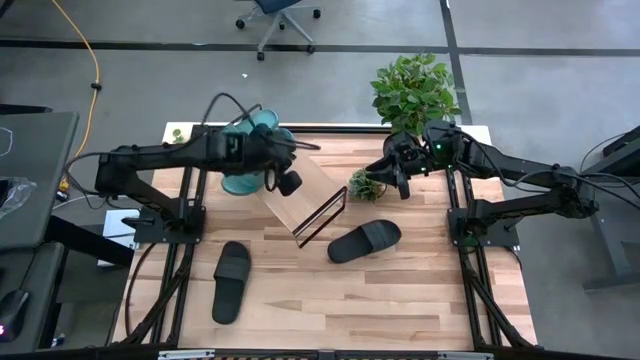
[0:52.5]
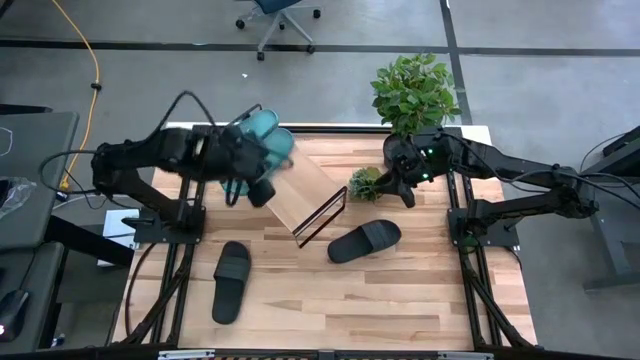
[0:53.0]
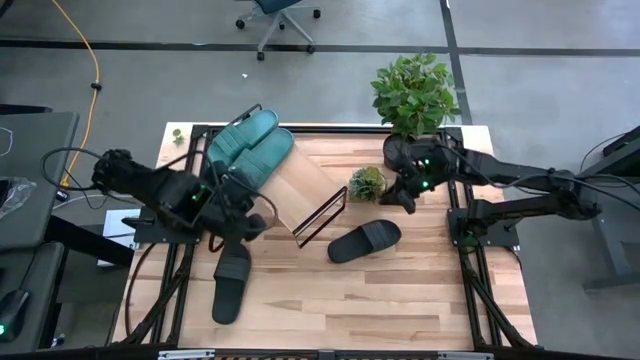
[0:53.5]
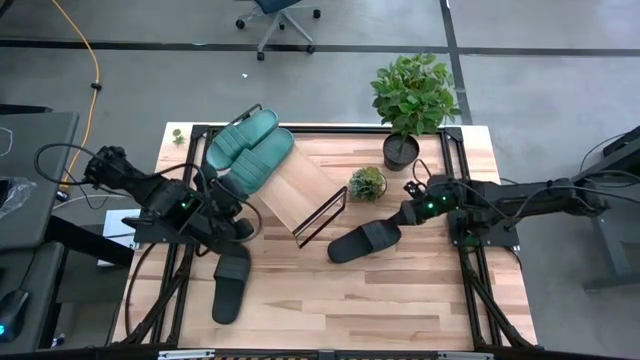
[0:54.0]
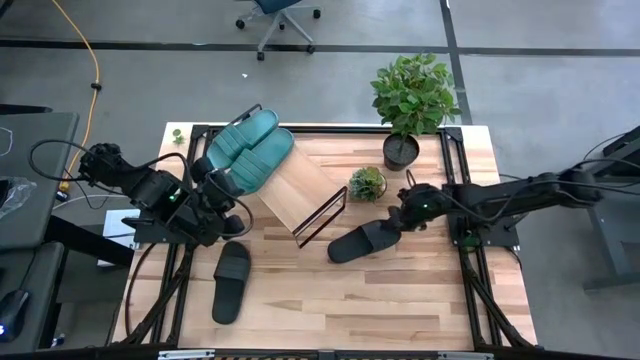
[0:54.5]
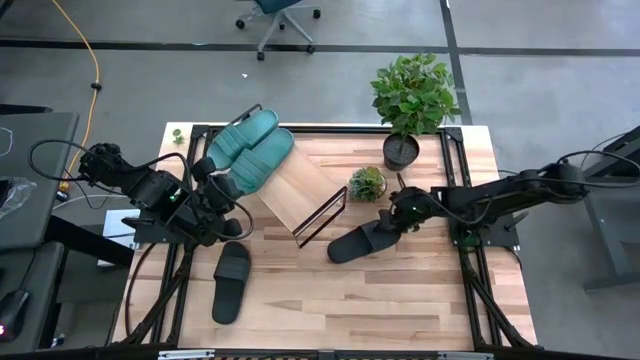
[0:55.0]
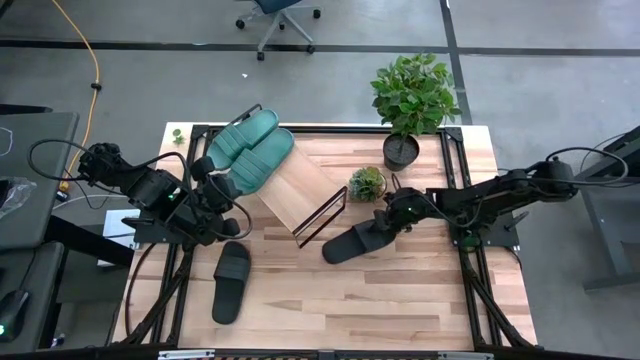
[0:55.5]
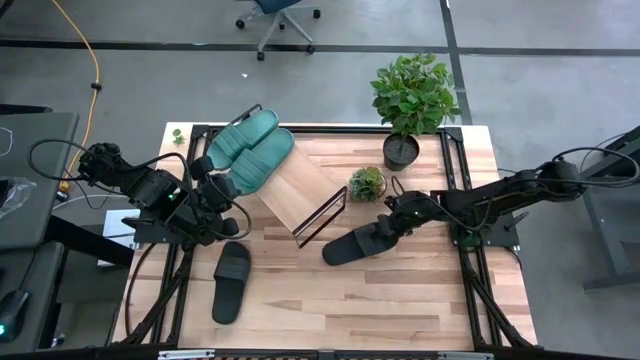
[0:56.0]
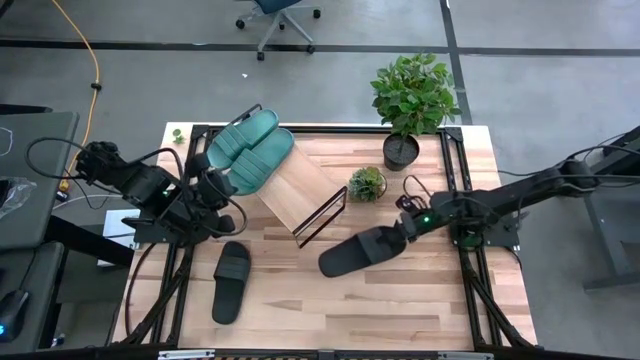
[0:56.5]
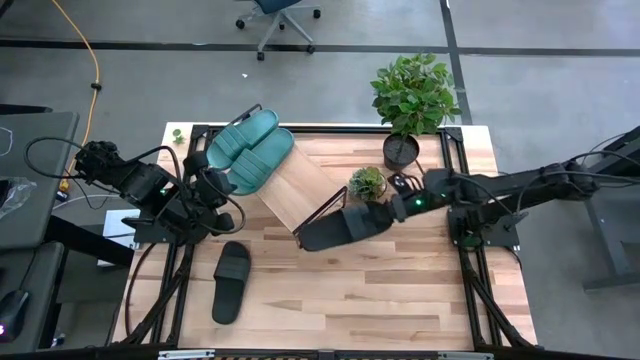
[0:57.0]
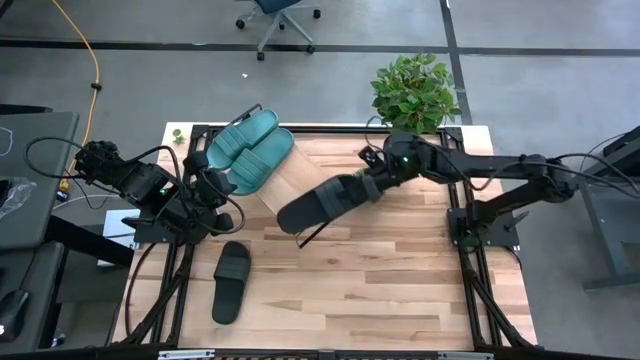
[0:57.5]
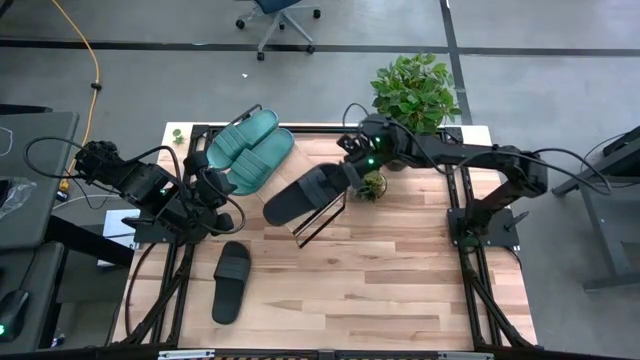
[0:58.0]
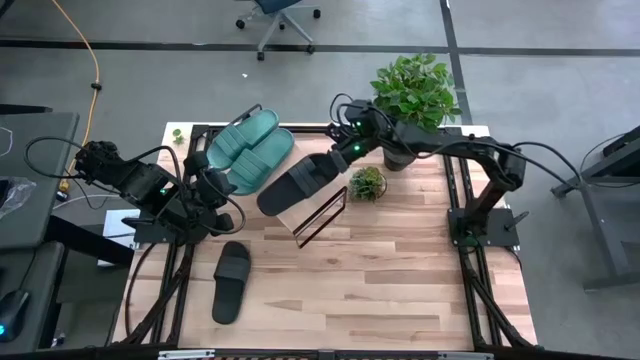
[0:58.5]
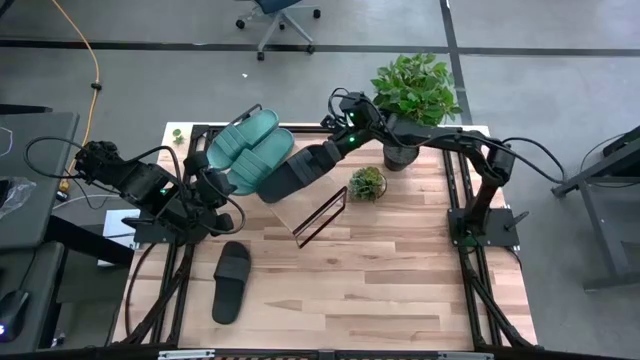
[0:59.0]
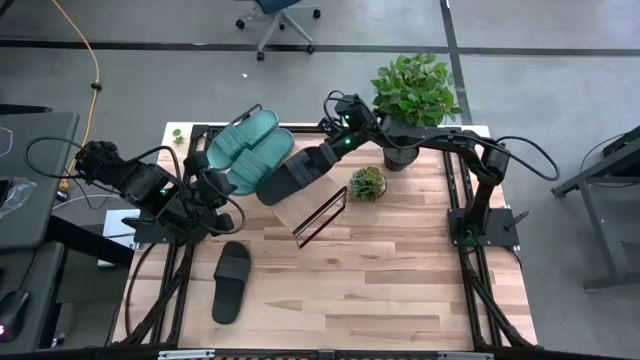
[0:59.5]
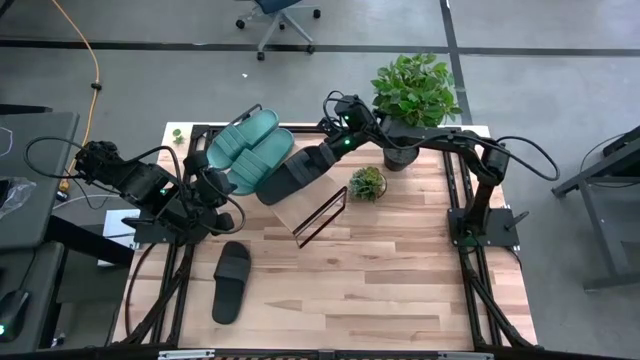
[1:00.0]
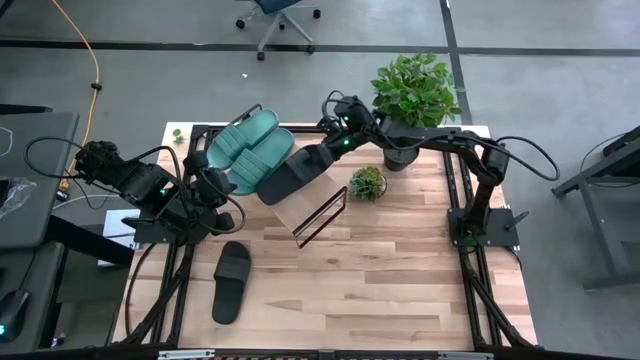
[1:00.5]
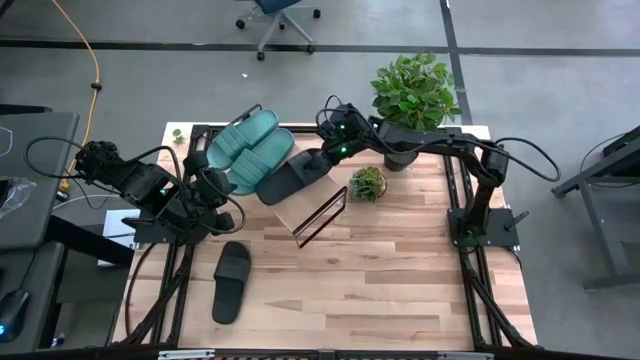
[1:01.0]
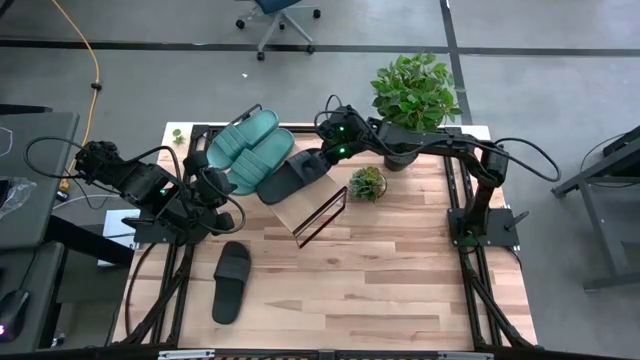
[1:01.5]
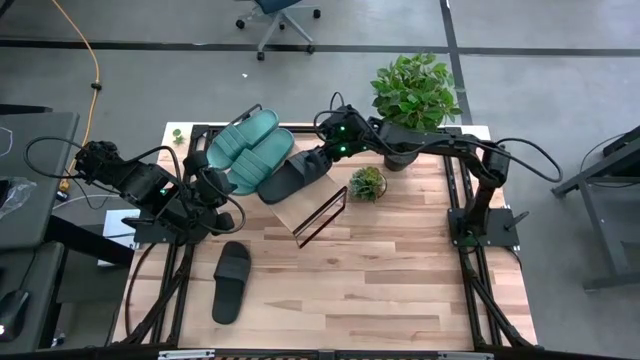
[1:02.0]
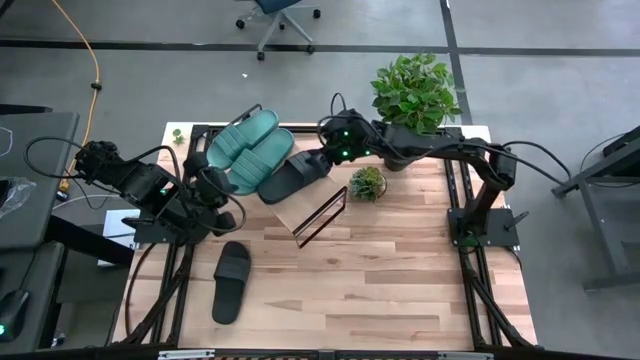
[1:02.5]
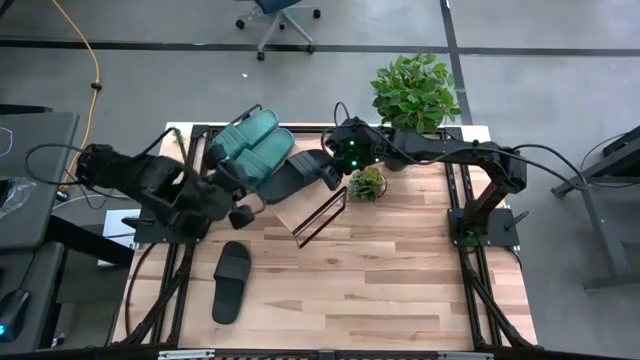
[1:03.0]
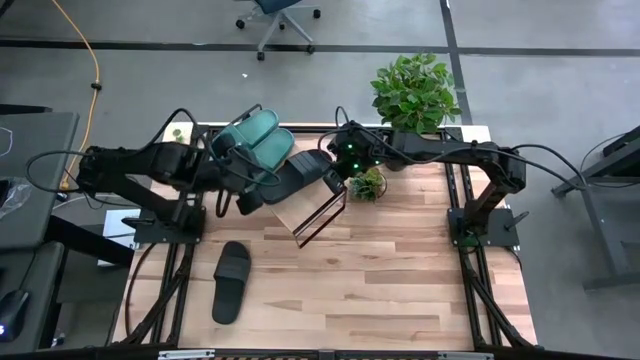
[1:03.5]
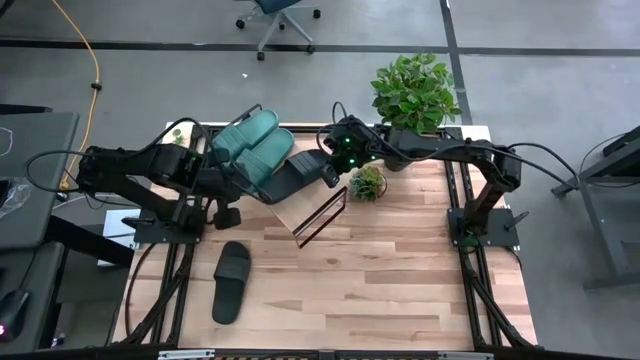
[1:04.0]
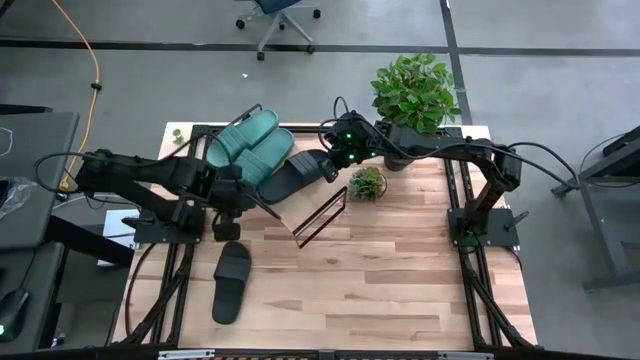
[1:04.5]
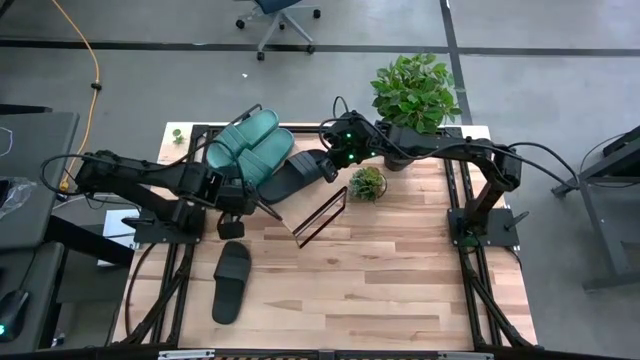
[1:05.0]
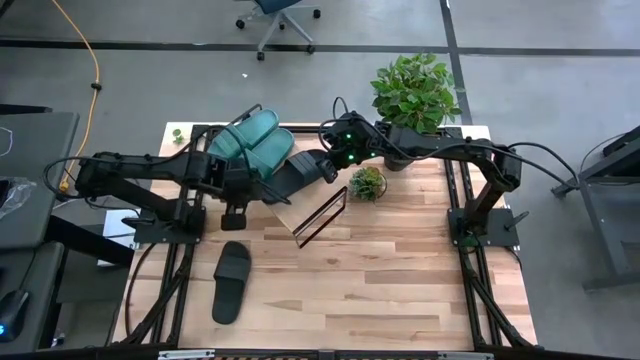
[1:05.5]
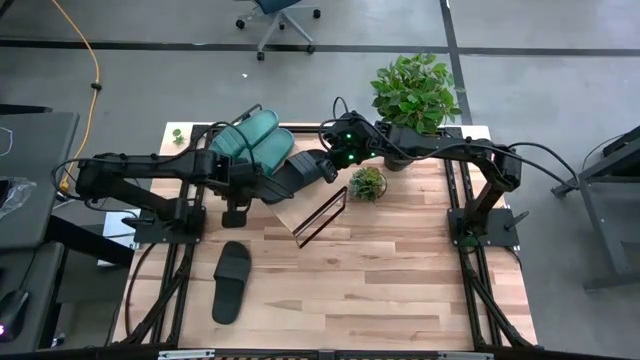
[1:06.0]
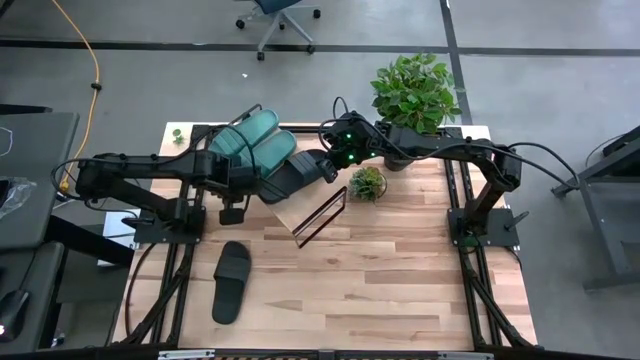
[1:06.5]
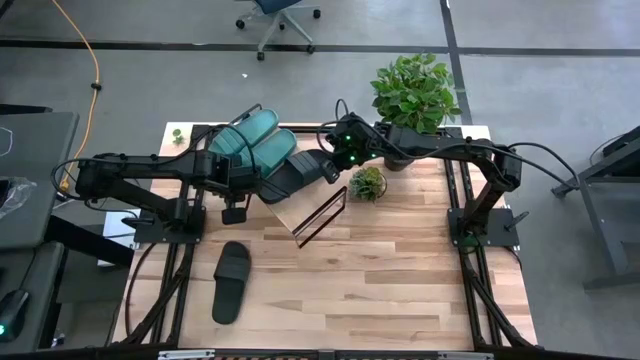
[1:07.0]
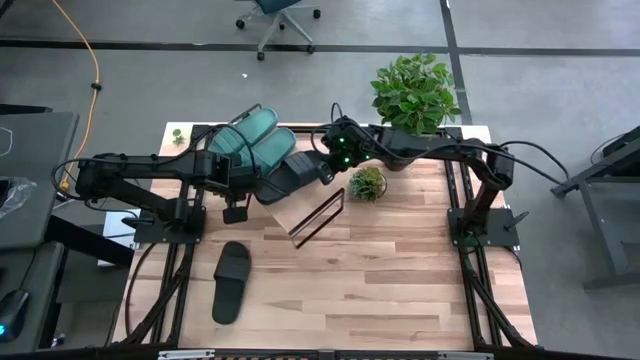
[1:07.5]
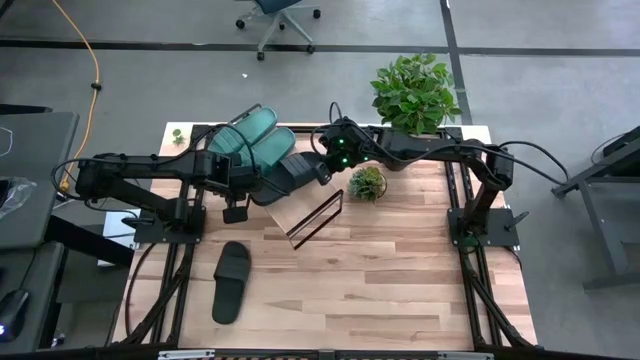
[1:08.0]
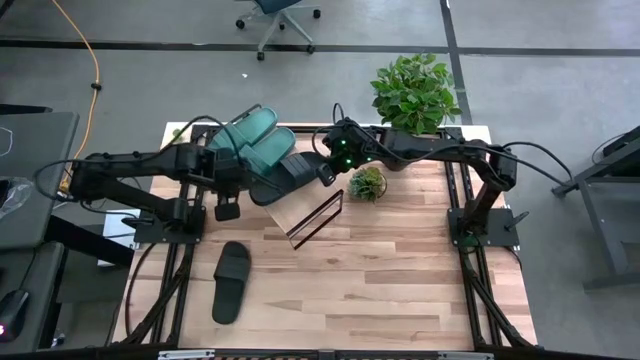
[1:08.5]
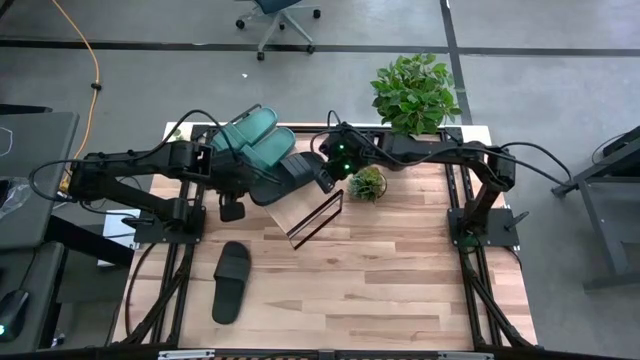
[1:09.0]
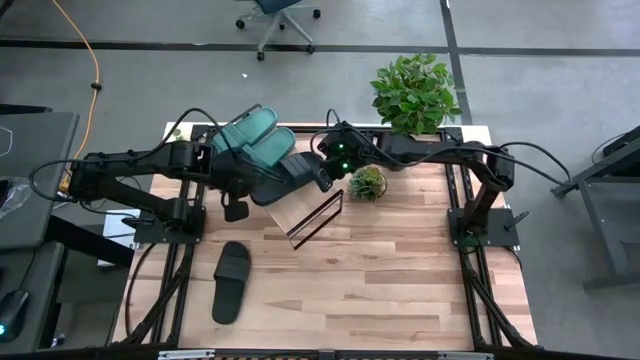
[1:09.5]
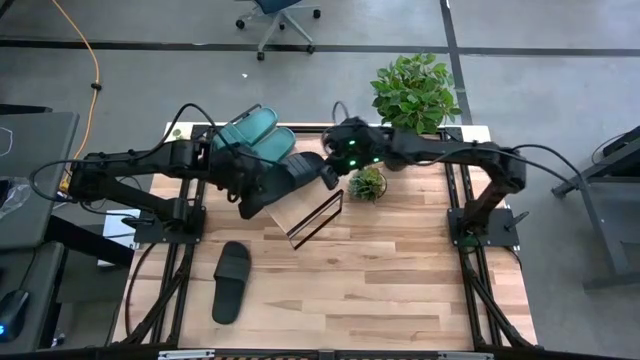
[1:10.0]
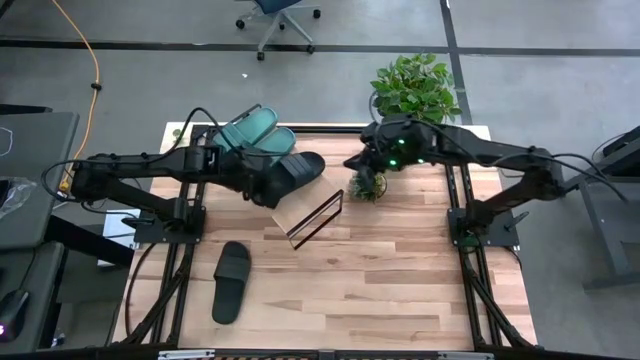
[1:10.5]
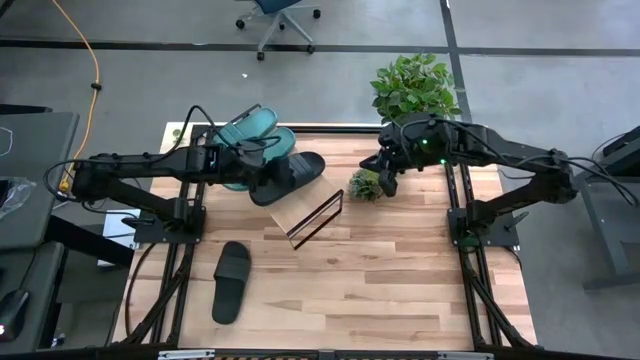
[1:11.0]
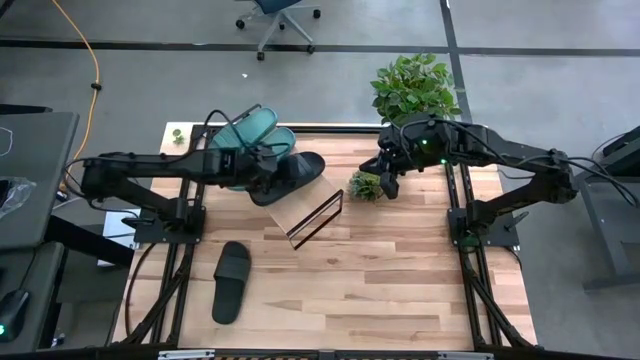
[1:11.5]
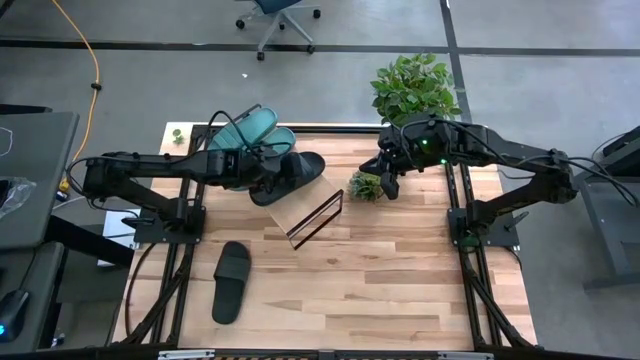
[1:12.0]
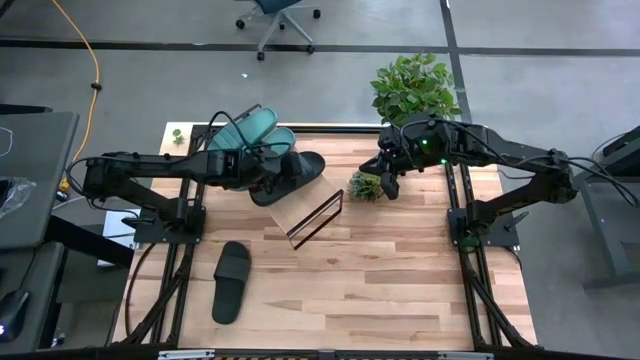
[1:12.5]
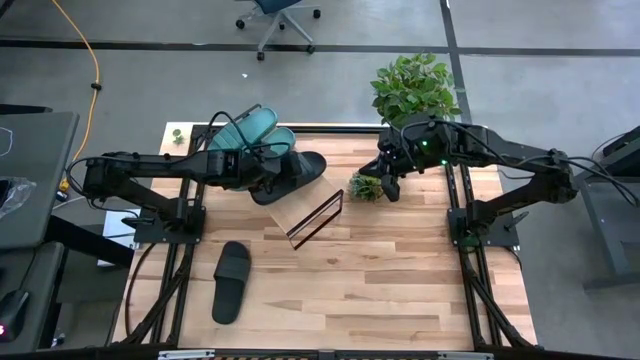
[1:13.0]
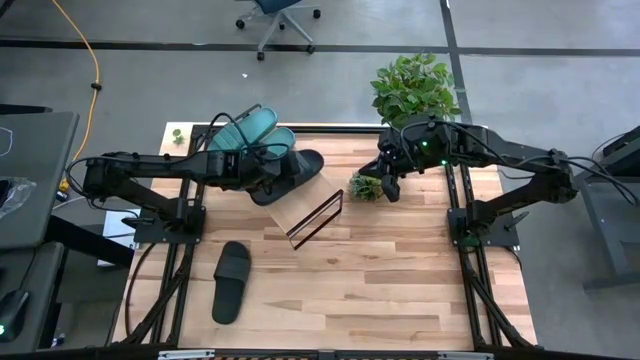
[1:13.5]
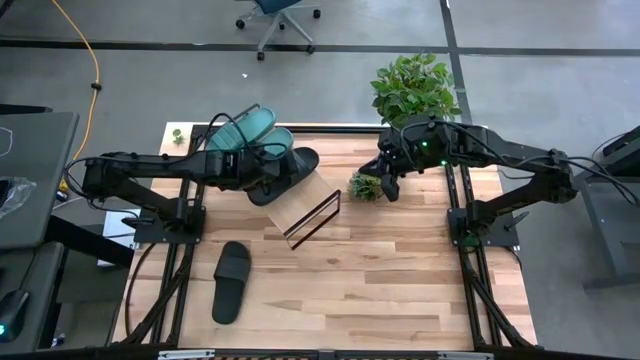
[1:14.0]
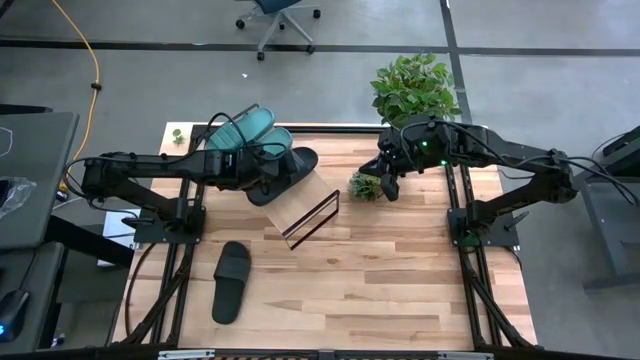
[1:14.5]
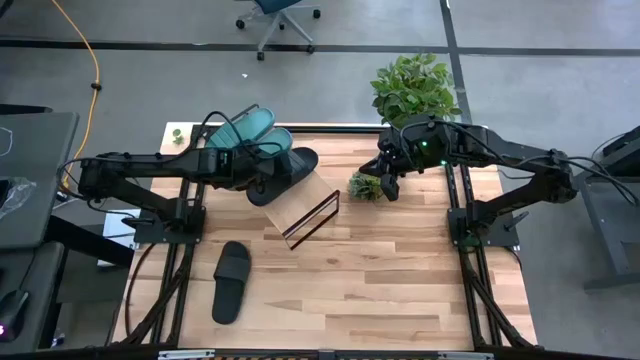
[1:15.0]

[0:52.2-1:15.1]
Task: Pick and place slippers onto the shelf
Put the right black pair of slippers on the shelf
